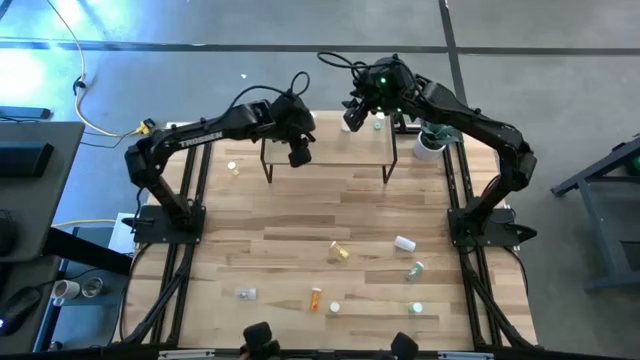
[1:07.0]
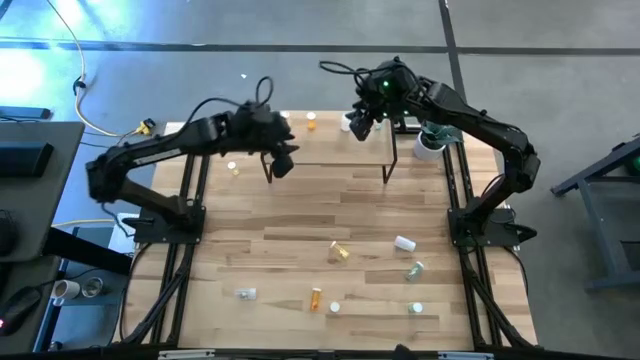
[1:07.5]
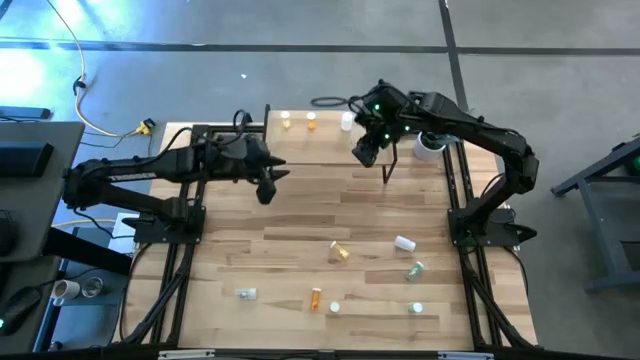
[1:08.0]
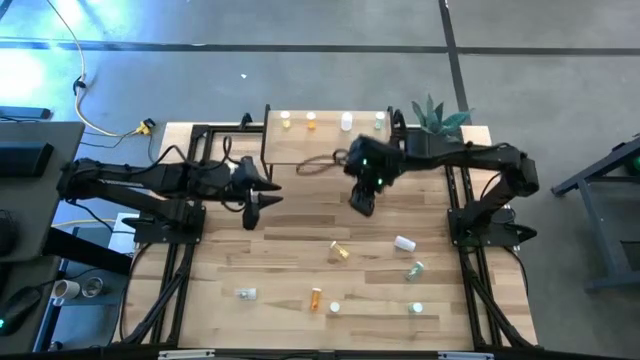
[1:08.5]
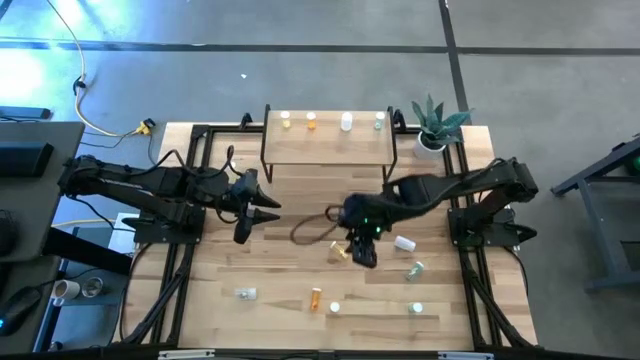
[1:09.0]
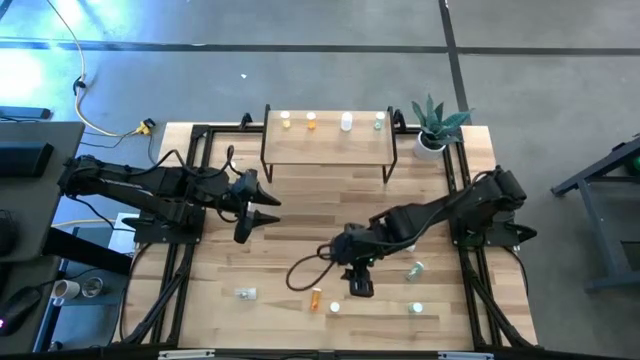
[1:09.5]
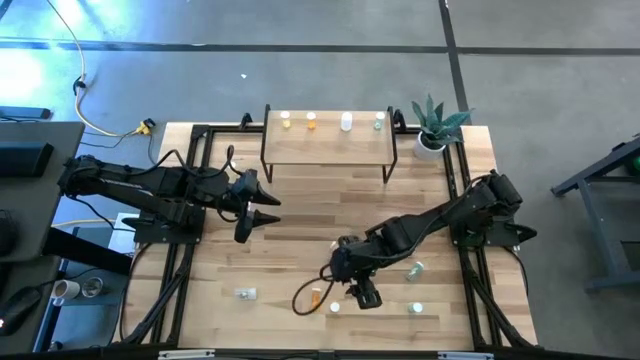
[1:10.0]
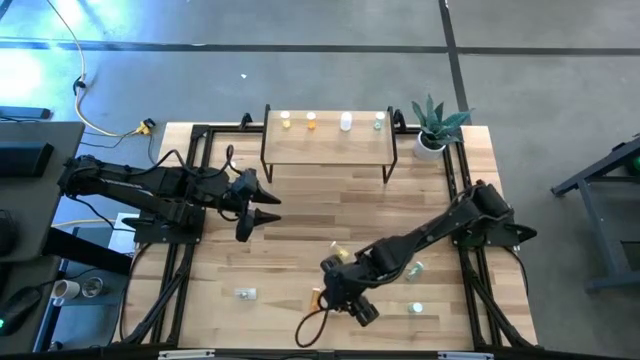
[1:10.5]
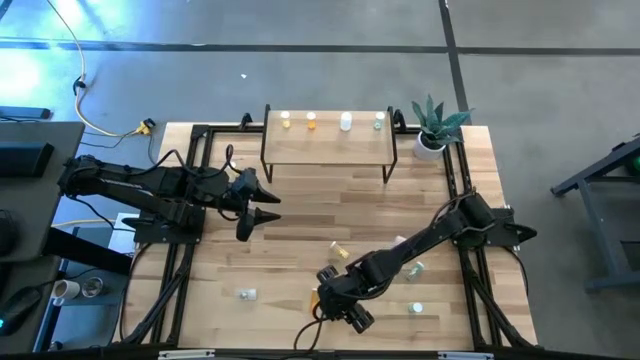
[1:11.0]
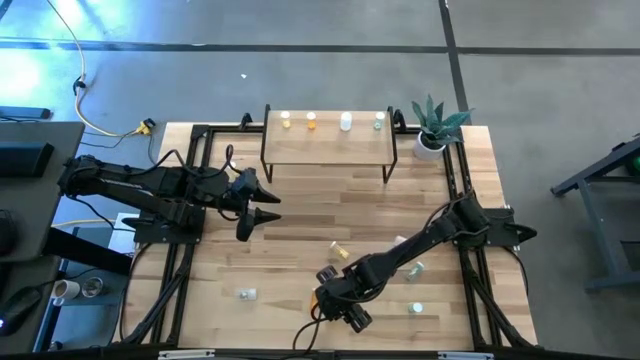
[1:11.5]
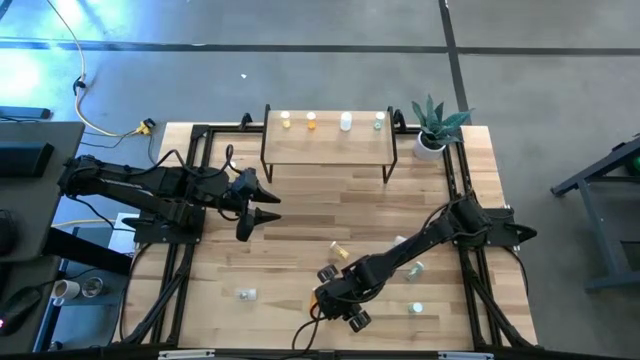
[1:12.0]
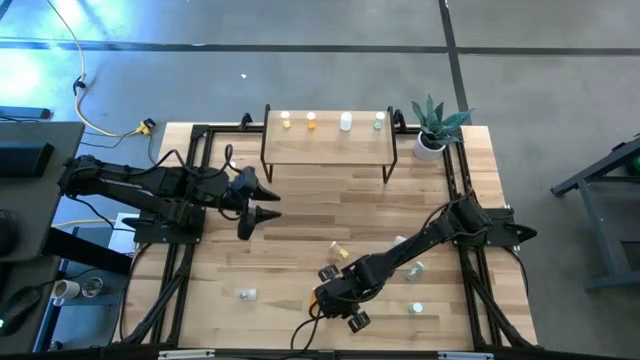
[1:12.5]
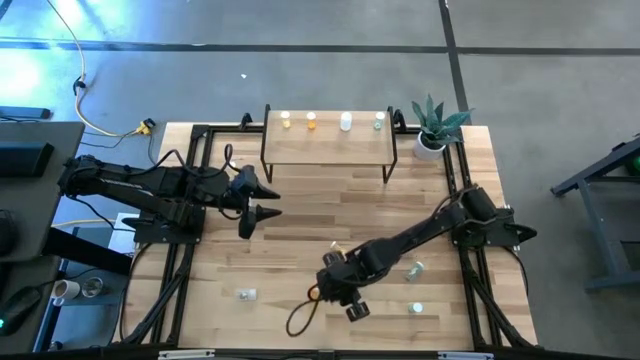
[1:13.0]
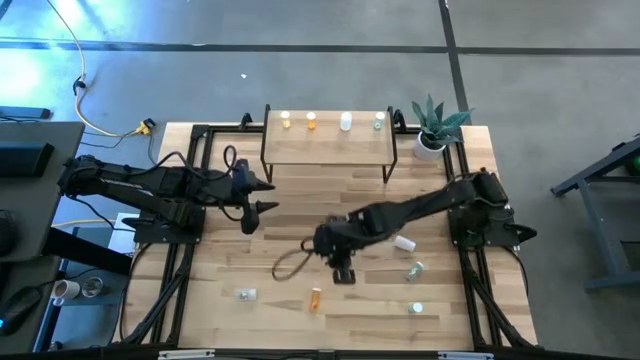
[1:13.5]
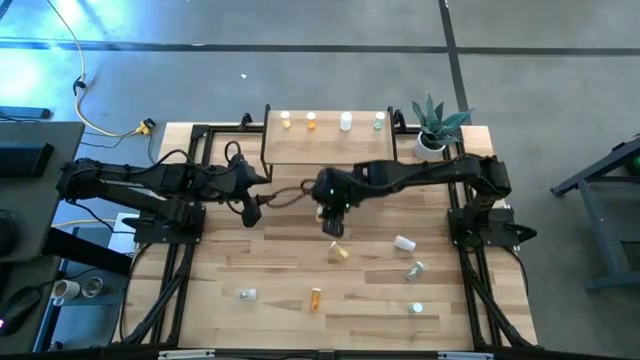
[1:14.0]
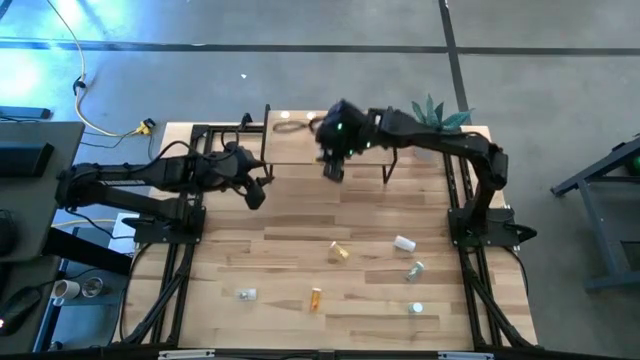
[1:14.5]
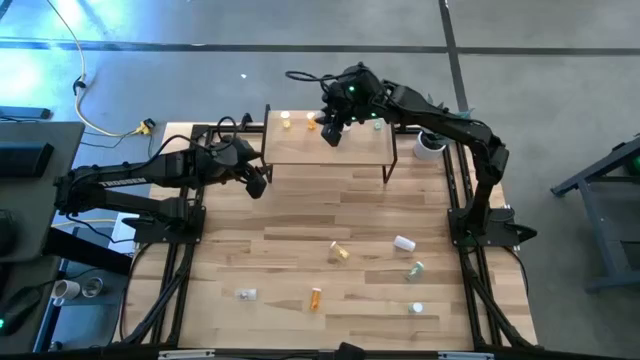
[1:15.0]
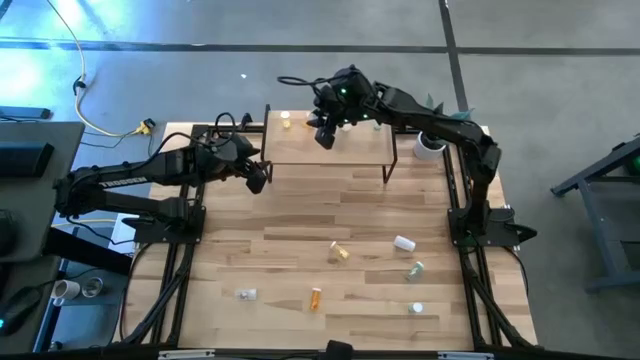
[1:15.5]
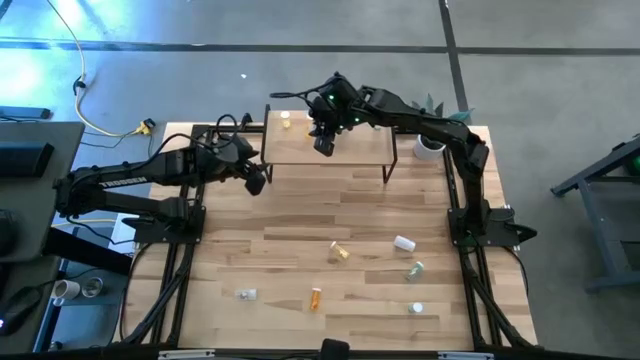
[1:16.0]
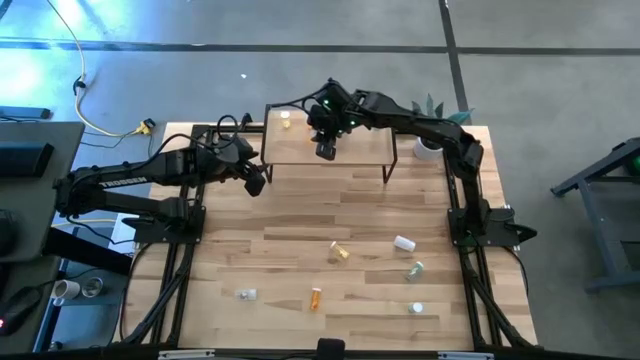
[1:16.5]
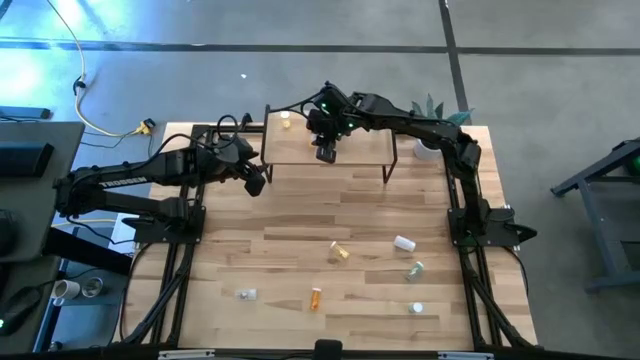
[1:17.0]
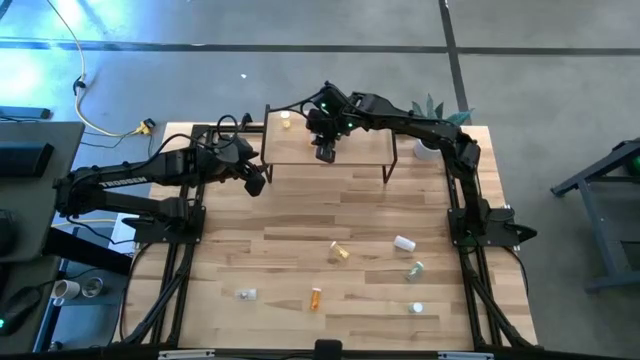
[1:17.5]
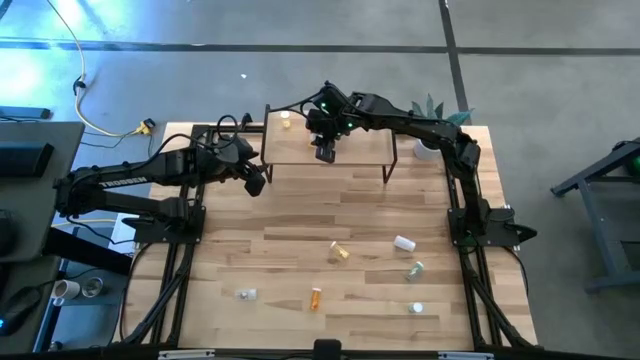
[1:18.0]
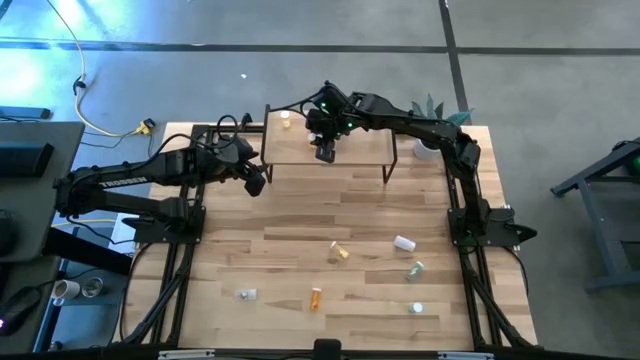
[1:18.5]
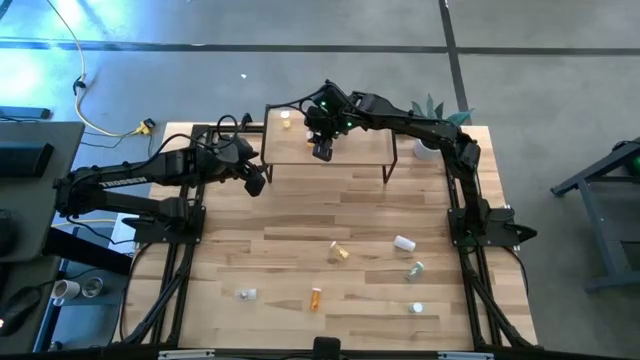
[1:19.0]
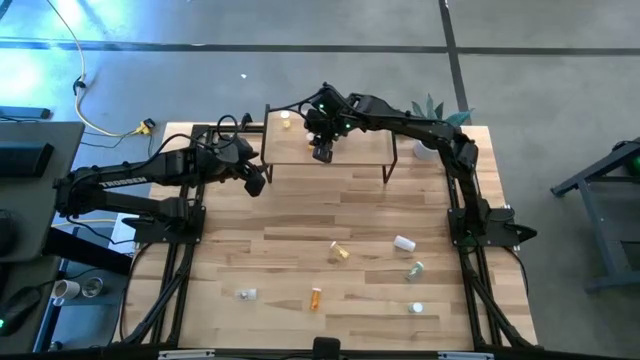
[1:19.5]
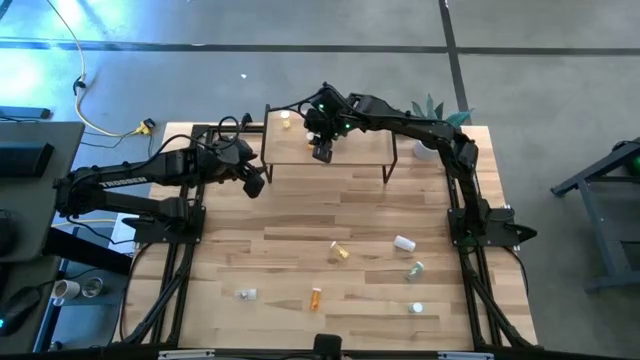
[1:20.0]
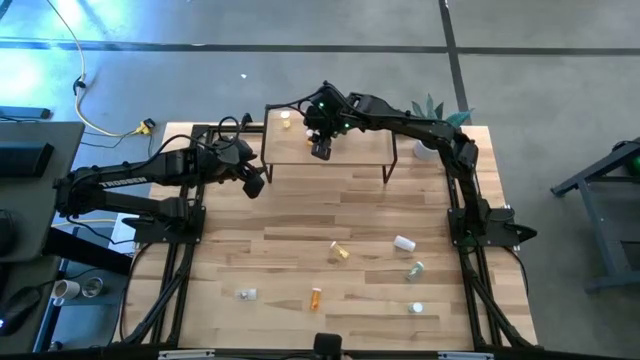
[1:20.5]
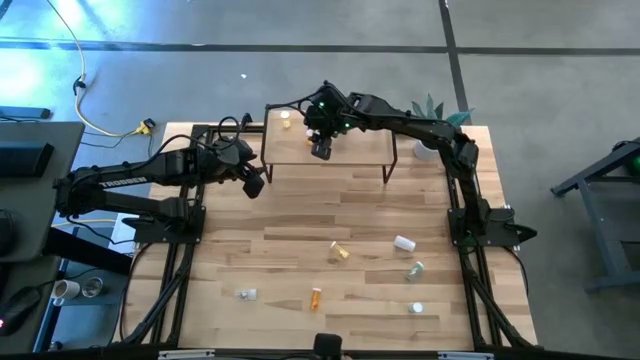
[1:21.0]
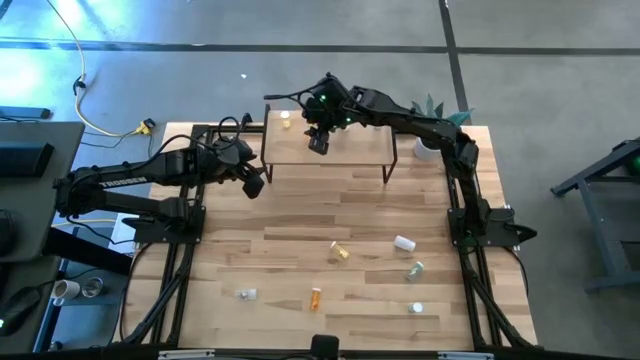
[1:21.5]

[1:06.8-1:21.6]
Task: Pick and place medicine bottles onto shelf by color
Put the right orange pill bottle on the shelf and align it to the other orange pill bottle

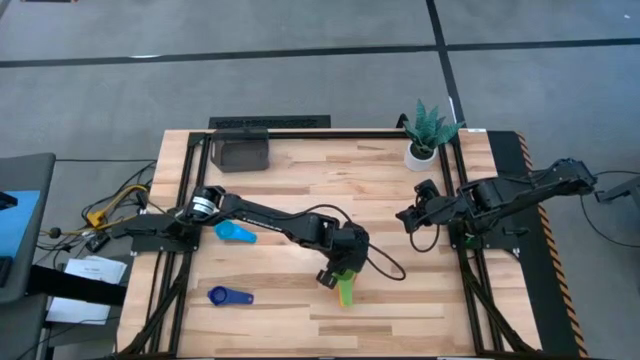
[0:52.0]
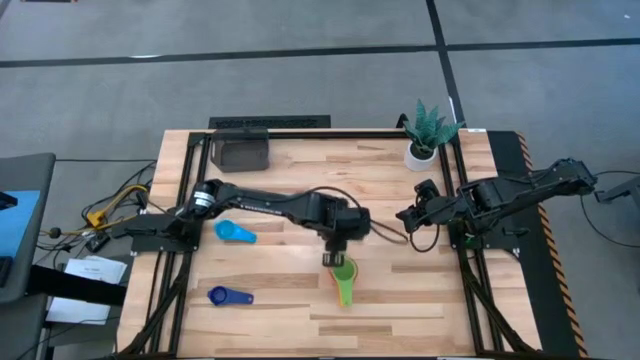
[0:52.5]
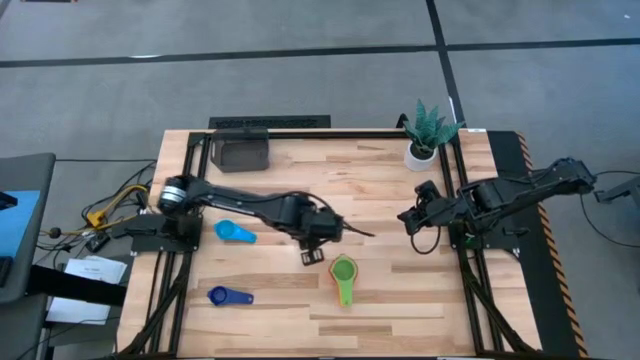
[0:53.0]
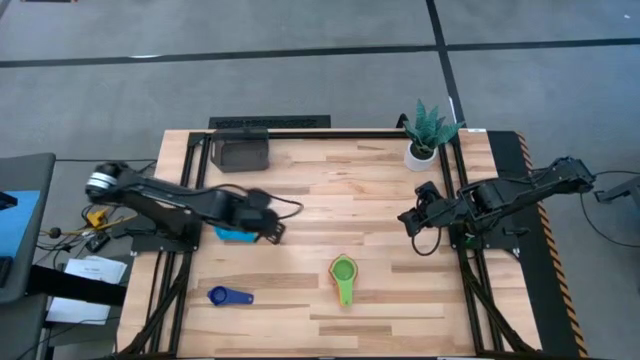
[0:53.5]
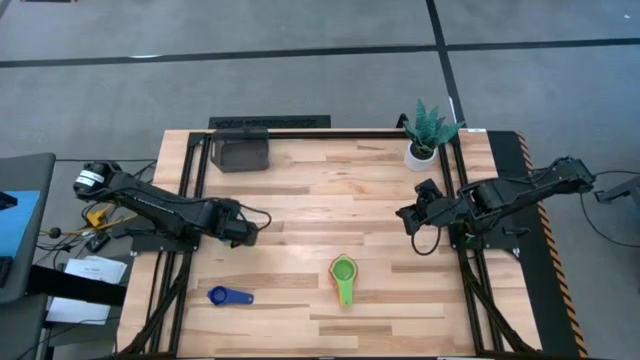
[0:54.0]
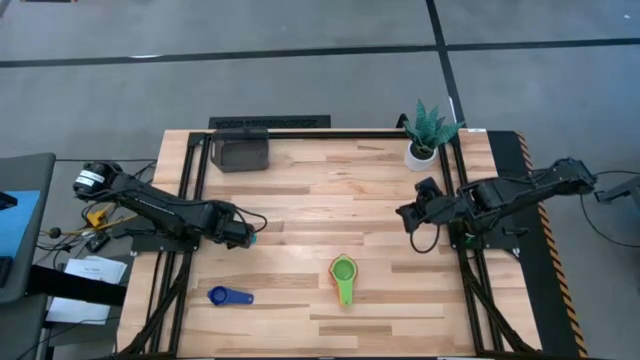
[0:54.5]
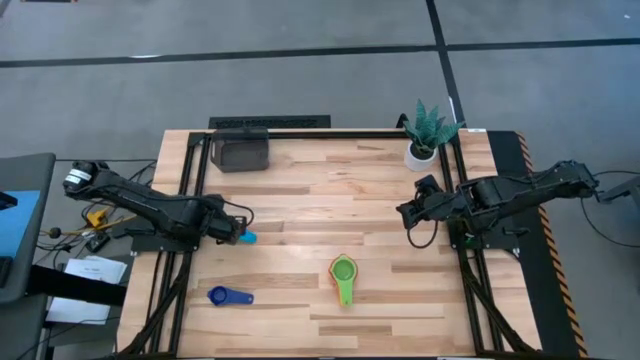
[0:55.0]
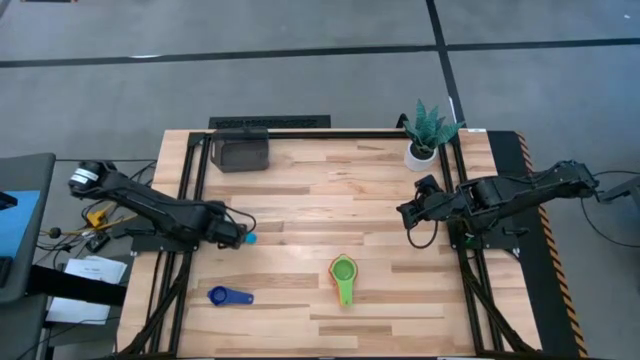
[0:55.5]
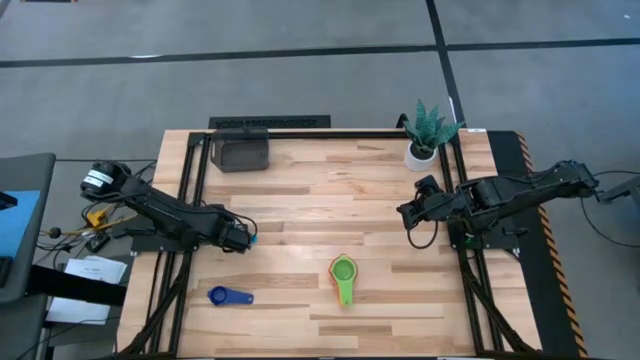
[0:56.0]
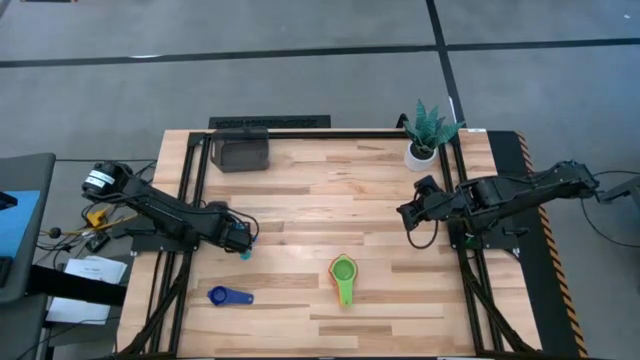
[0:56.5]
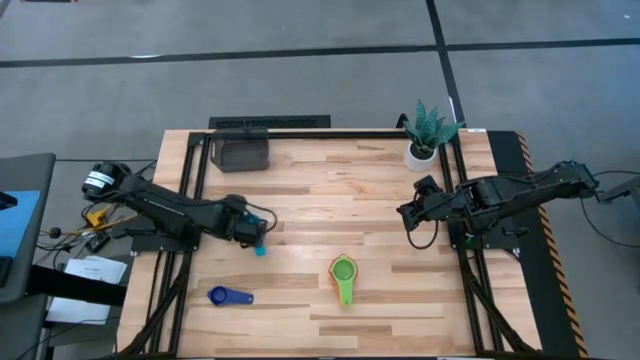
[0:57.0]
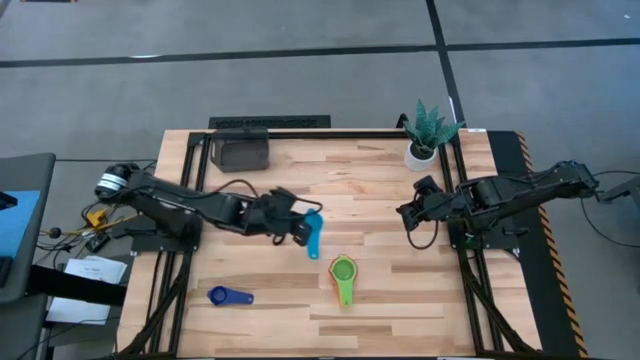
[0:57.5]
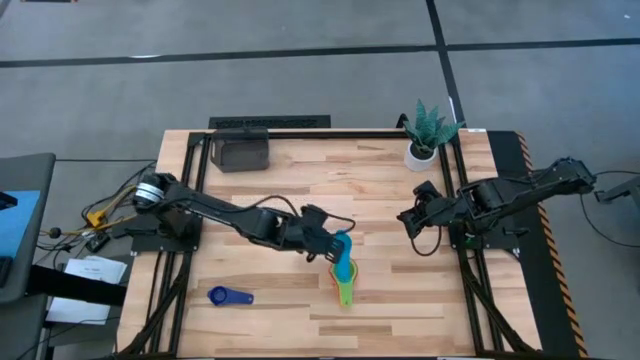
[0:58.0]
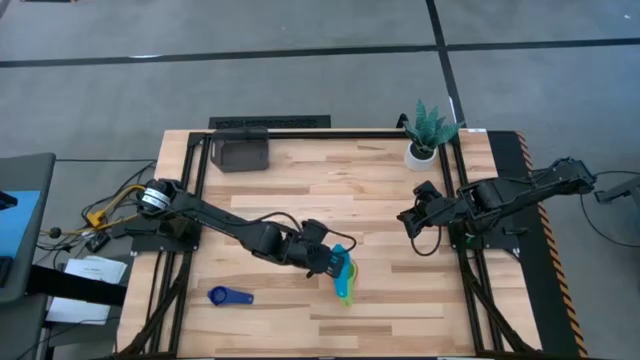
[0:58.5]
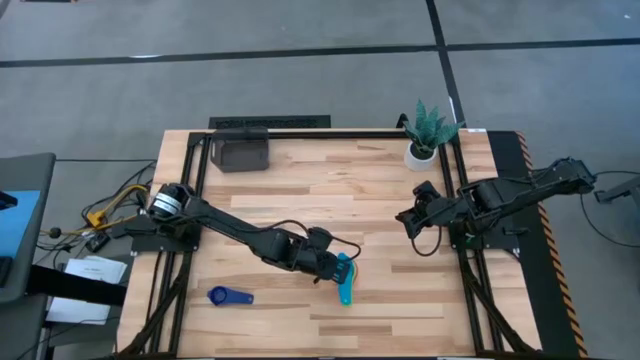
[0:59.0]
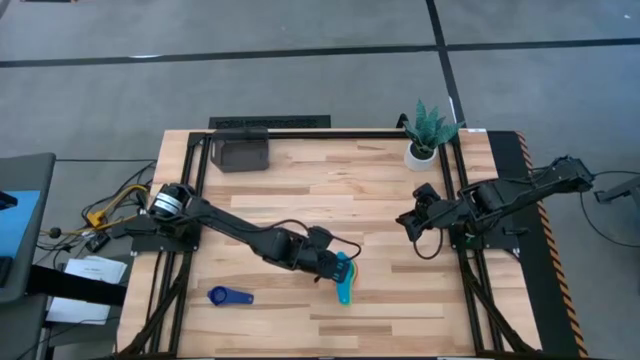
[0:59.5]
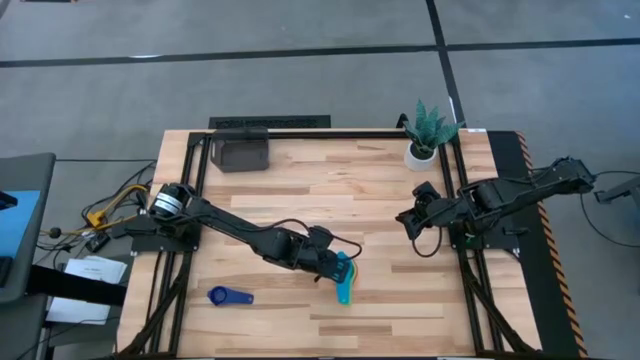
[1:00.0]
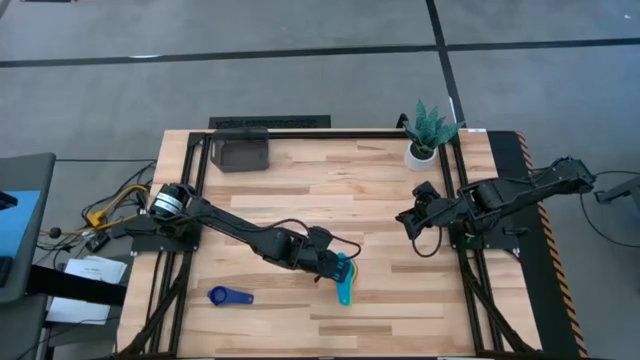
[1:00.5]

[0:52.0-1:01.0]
Task: Nest measuring cups in basket
Stack the light blue measuring cup on top of the green measuring cup
